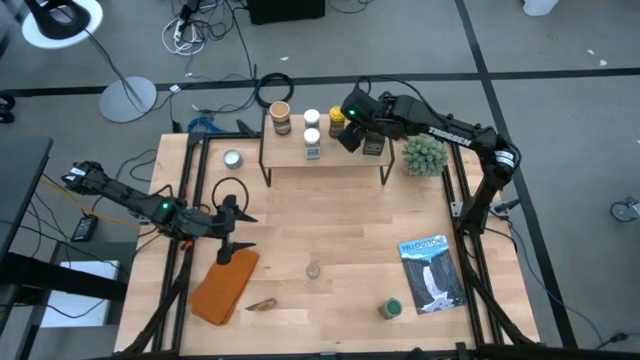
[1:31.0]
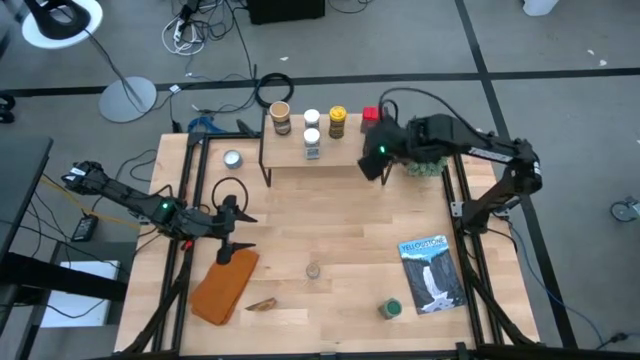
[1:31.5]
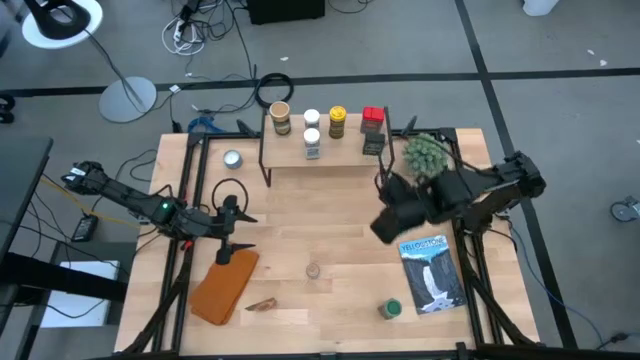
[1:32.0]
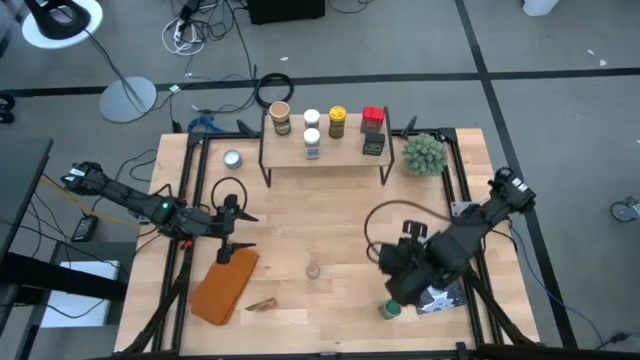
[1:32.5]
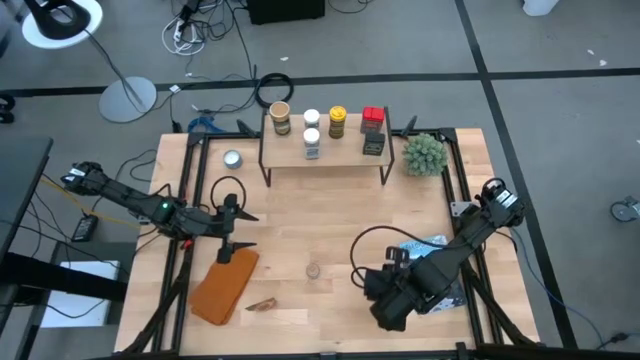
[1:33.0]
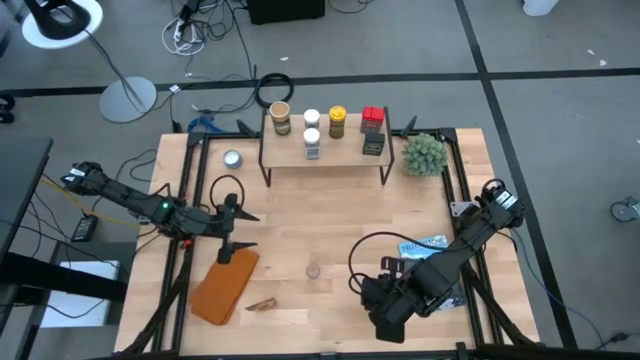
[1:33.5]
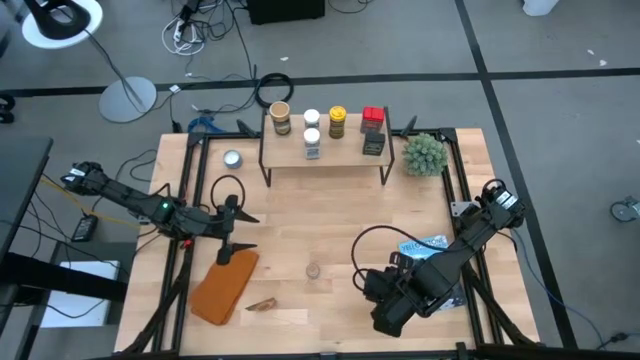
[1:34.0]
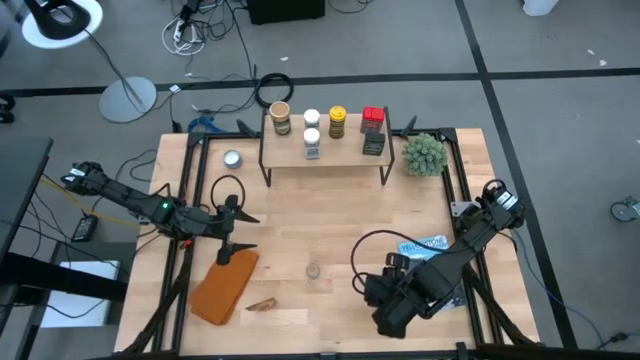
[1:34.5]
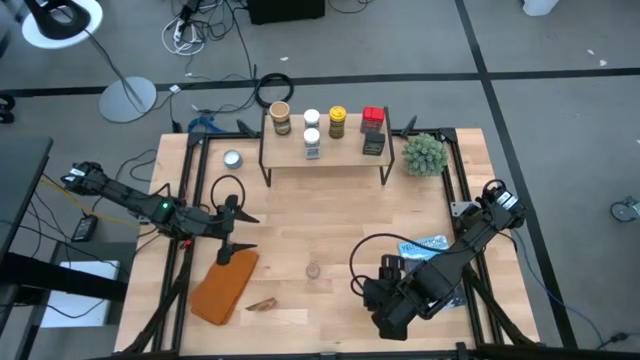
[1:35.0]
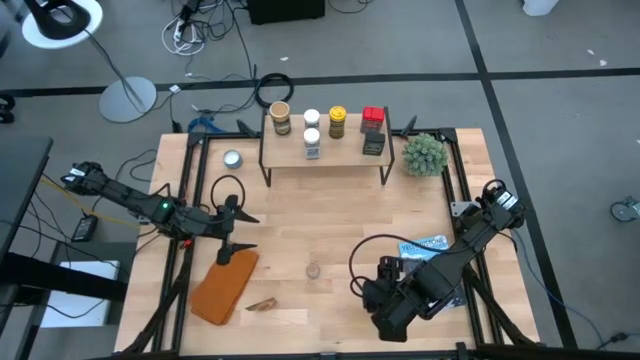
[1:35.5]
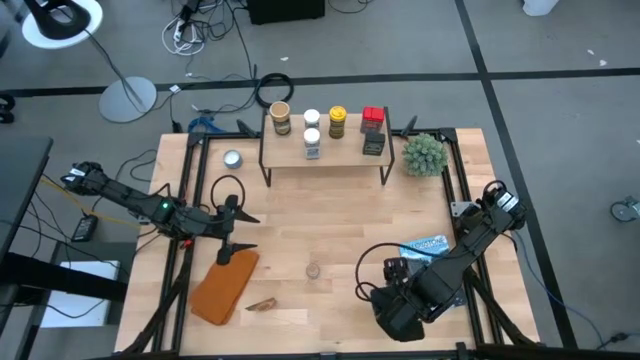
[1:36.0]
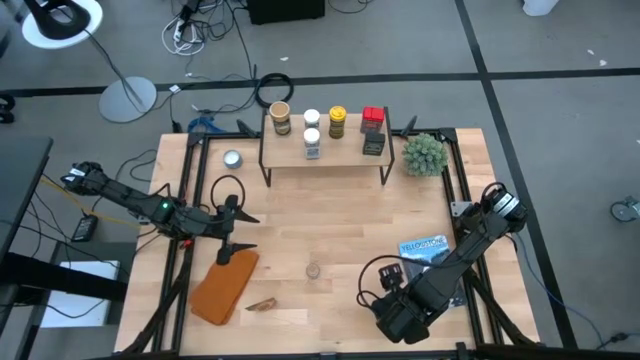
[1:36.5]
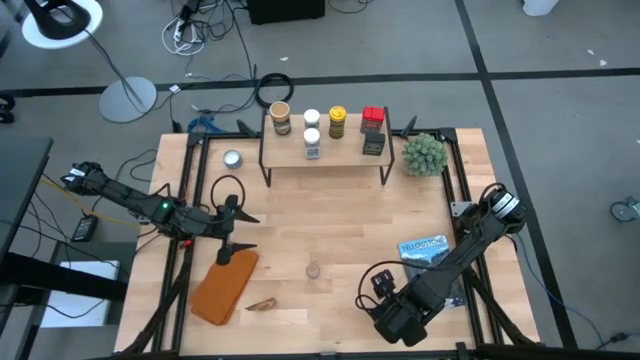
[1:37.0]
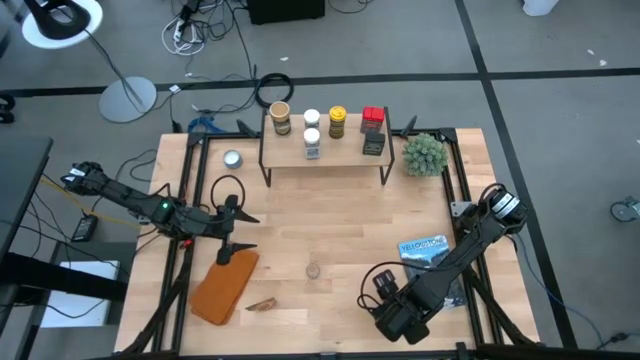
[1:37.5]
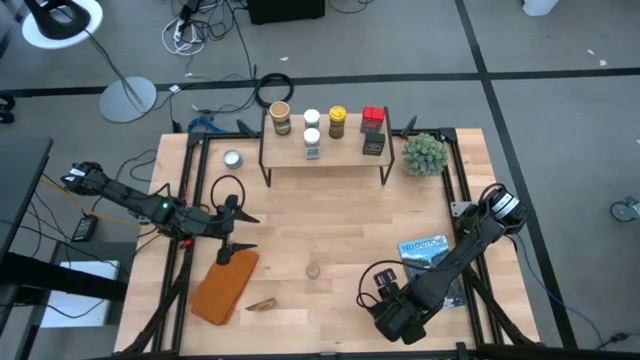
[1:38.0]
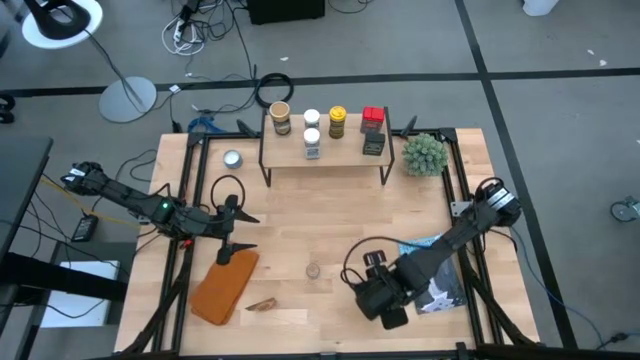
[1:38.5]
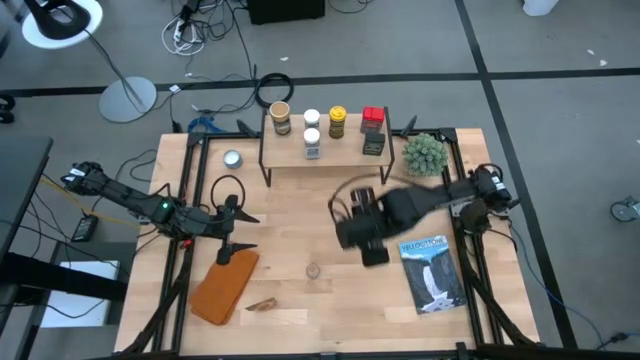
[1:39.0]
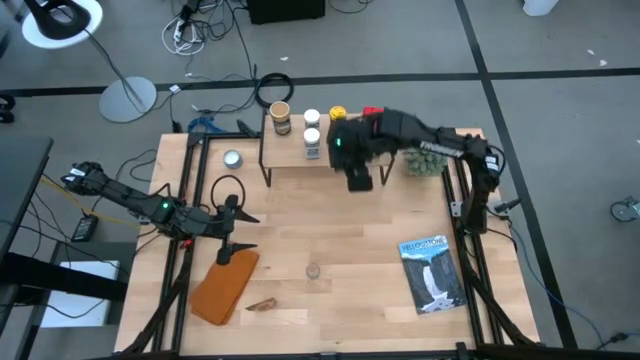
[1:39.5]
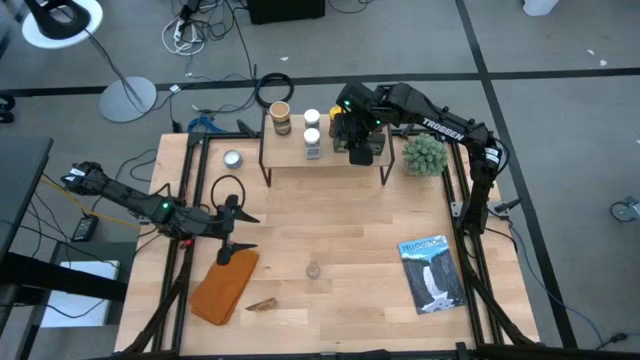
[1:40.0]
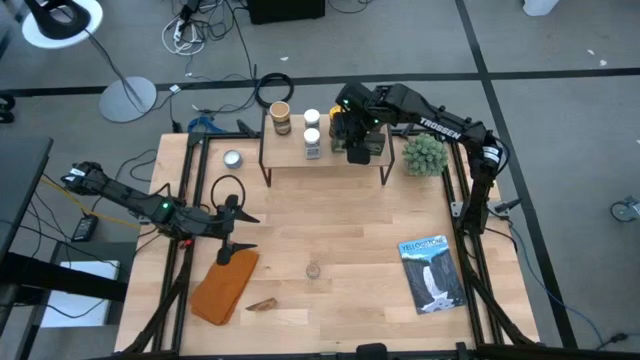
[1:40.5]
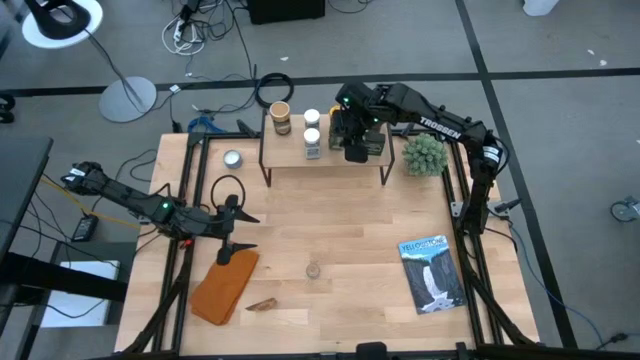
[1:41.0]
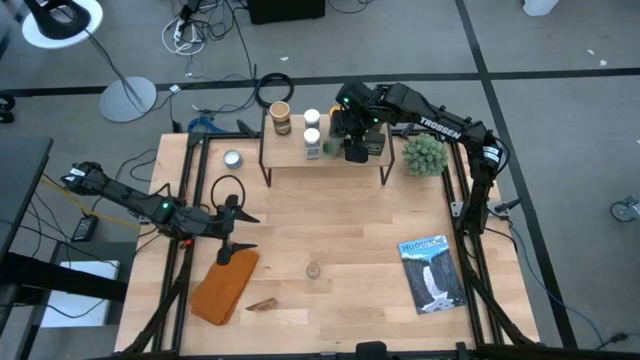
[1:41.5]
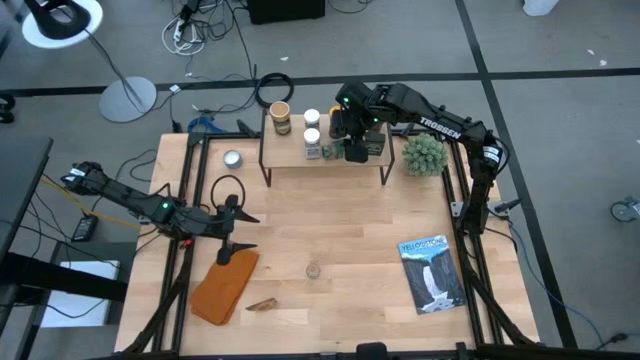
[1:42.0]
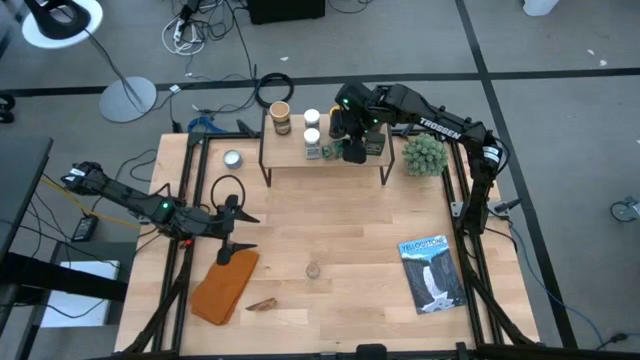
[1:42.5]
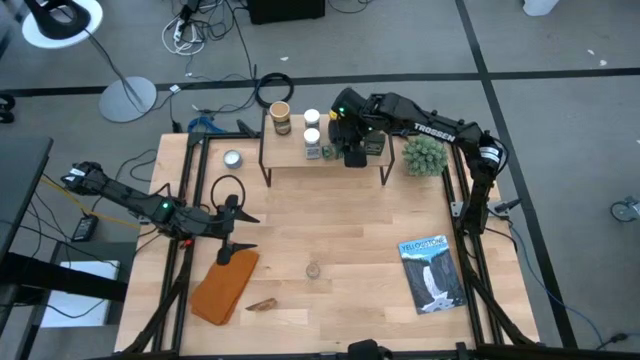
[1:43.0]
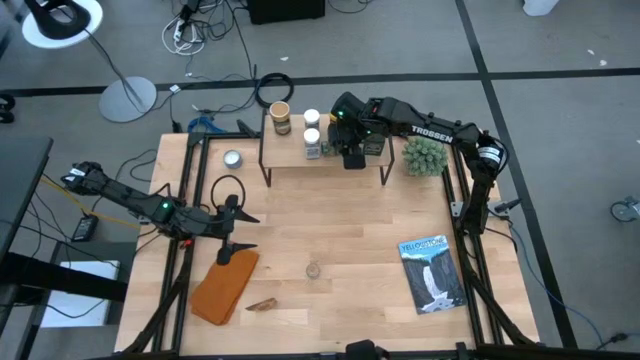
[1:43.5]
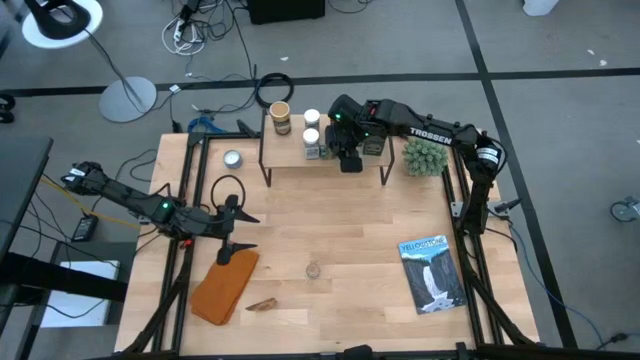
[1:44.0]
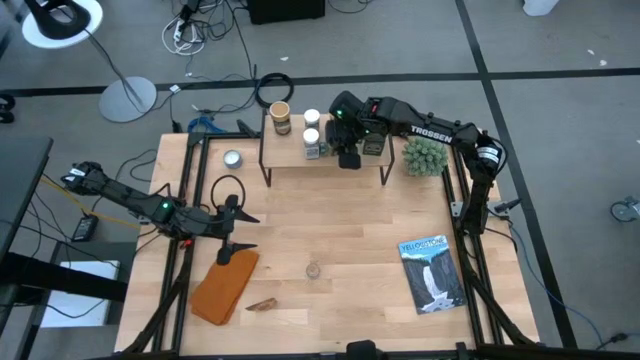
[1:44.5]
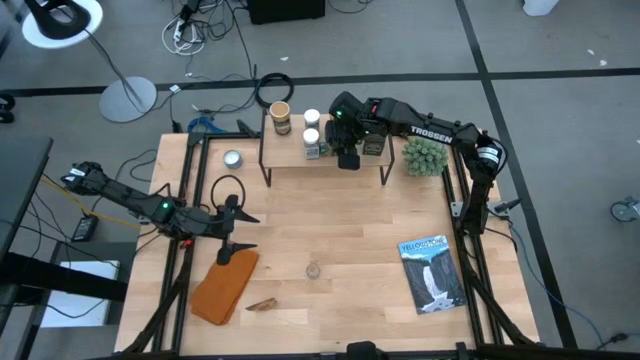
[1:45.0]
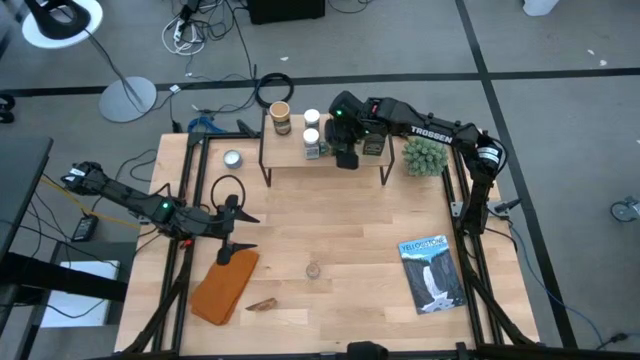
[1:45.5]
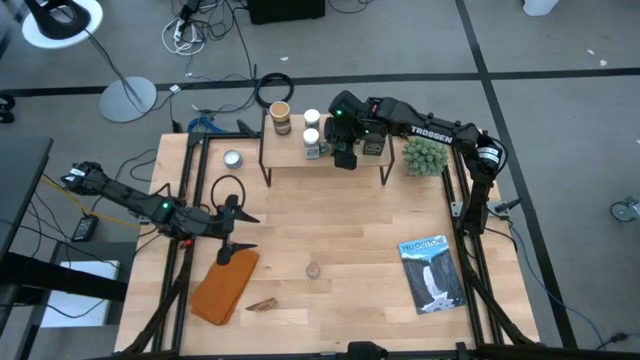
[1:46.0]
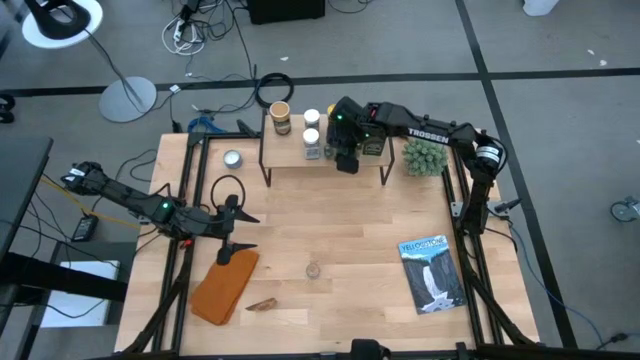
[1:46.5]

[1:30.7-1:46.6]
Task: Shelf spices
Put the green seasoning bottle on the shelf

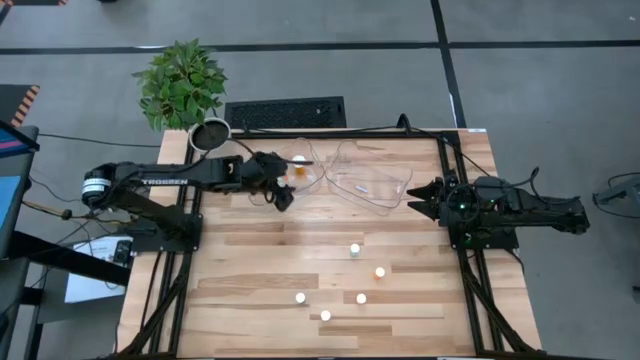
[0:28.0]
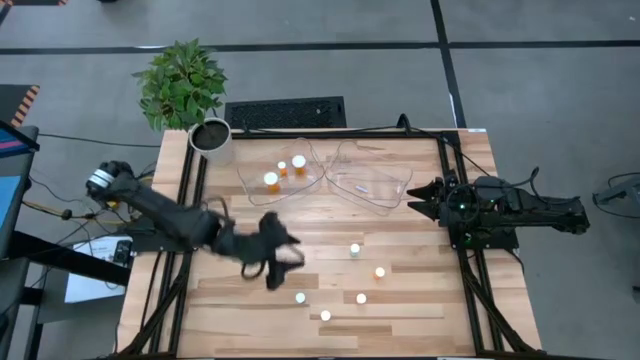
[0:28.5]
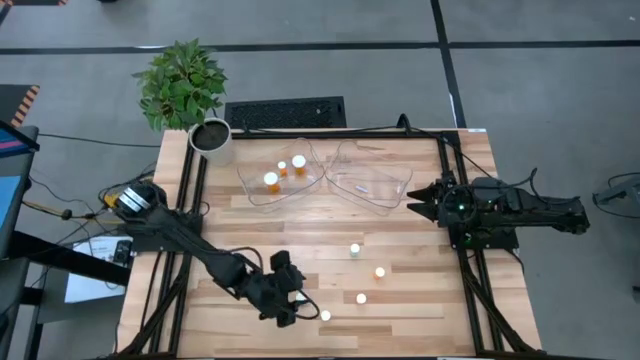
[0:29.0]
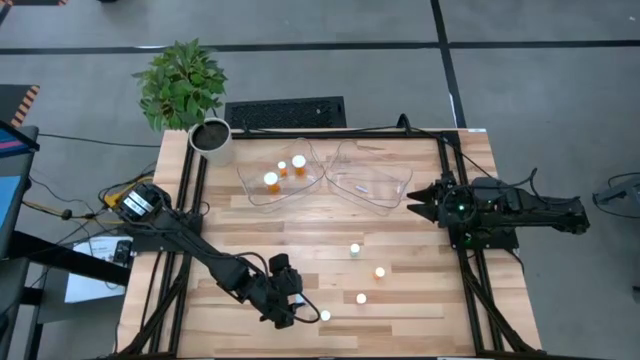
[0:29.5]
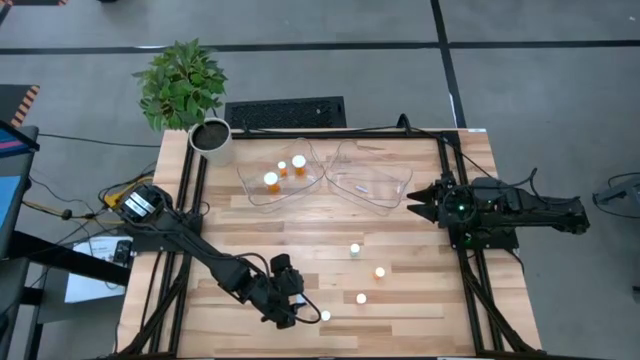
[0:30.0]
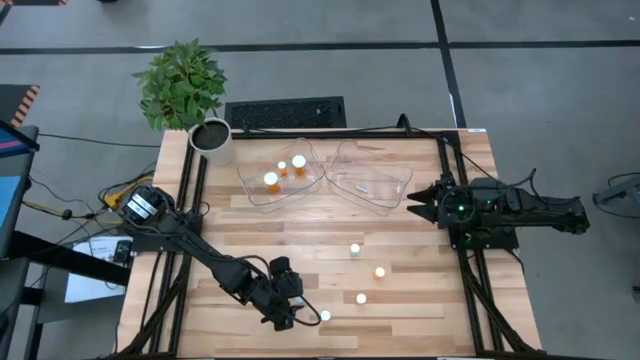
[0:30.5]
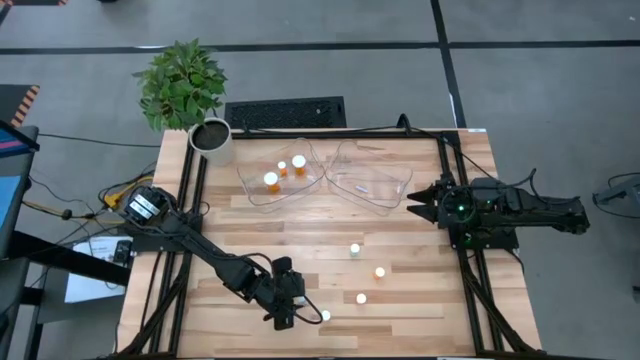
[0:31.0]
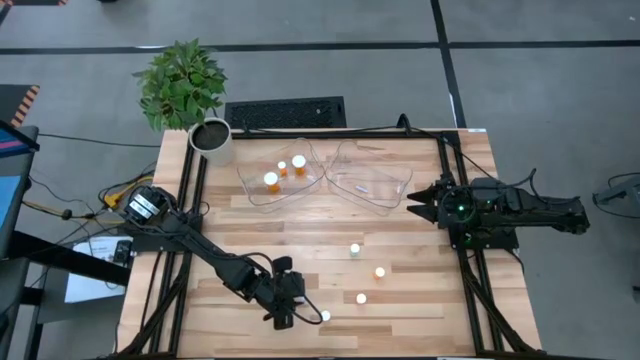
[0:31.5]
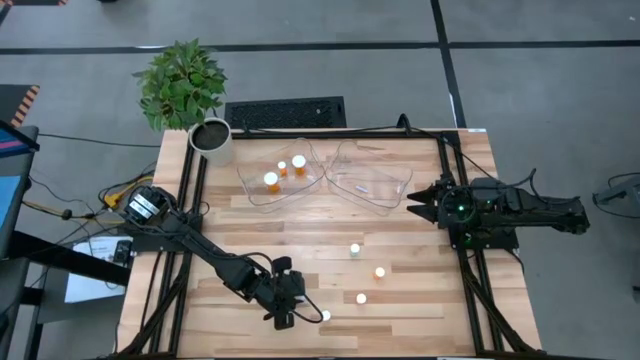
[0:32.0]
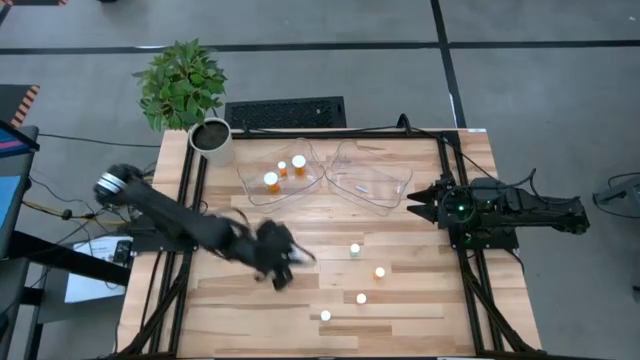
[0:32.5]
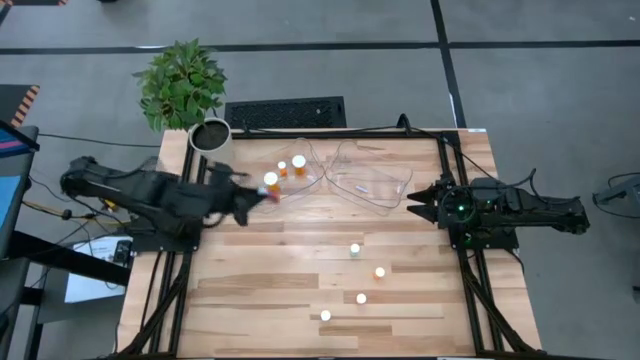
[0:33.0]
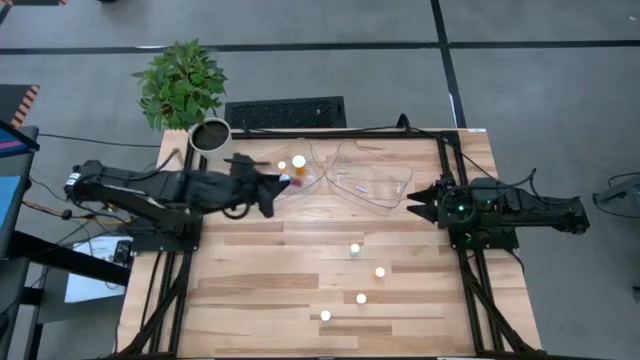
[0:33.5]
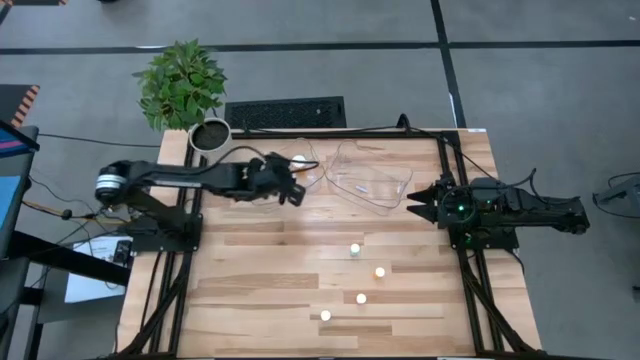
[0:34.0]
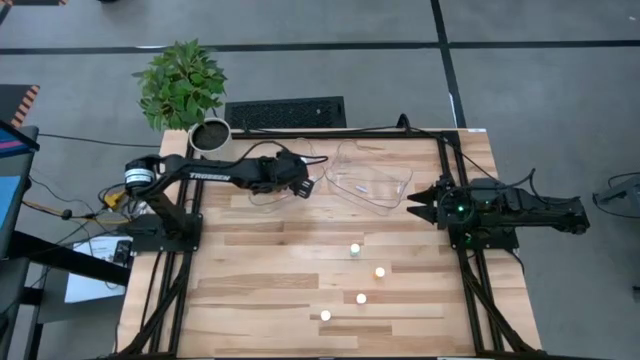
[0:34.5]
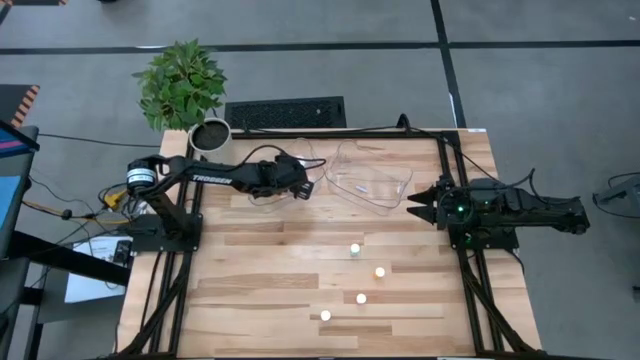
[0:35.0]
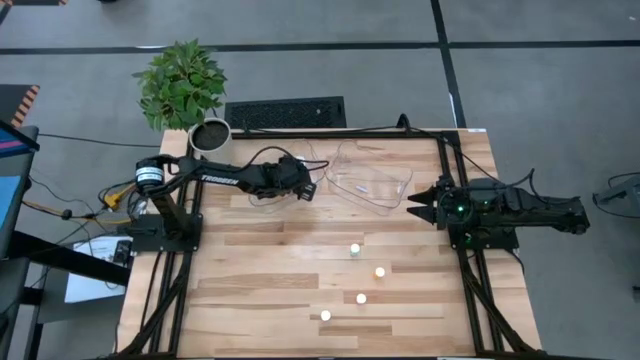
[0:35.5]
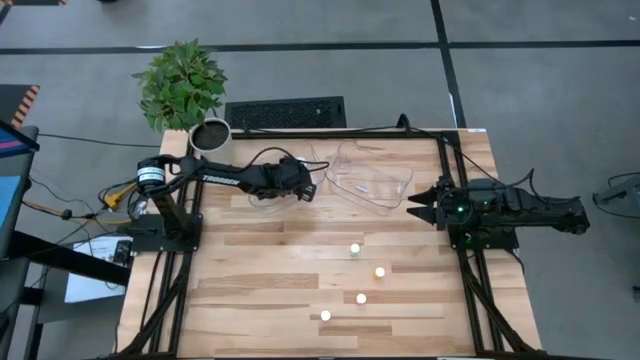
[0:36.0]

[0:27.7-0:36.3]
Task: Pick and place medicine bottles into bin by pill shape (circle, oval)
Put the small blue capsule bottle into the left transparent bin
